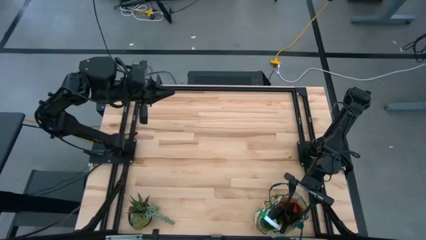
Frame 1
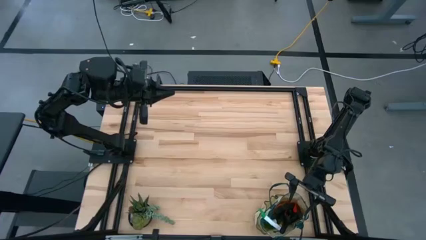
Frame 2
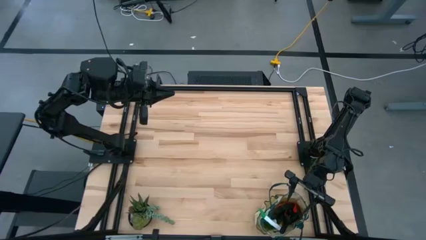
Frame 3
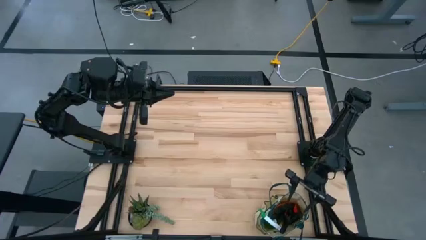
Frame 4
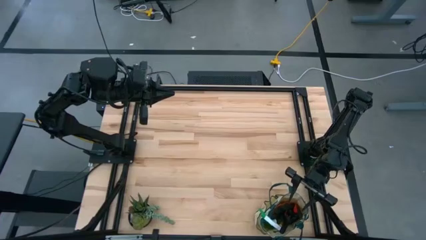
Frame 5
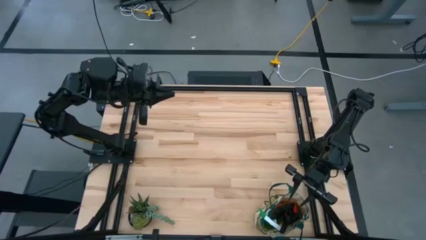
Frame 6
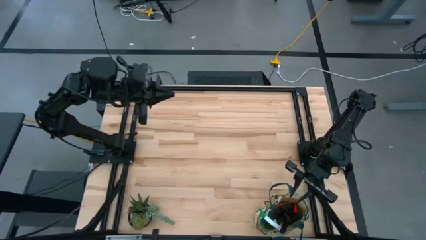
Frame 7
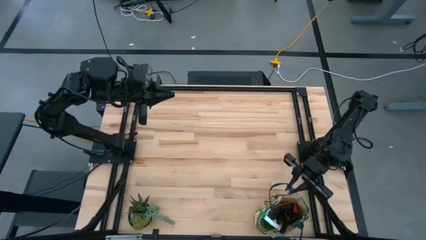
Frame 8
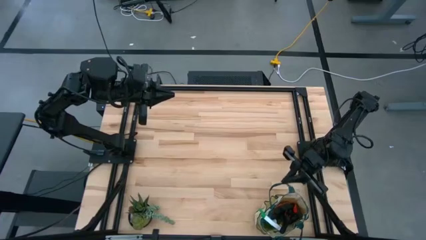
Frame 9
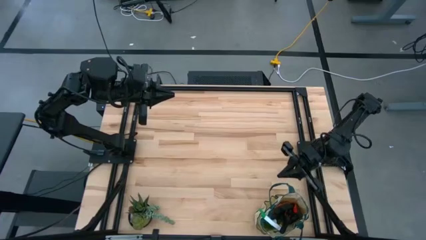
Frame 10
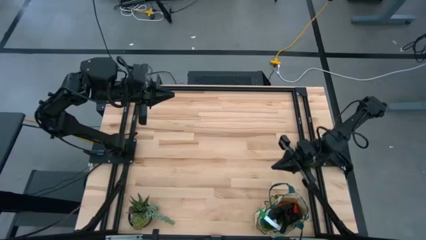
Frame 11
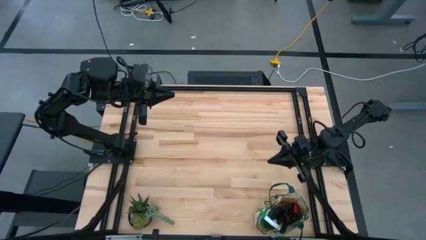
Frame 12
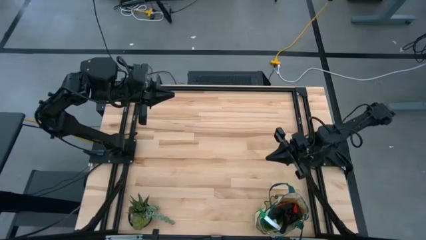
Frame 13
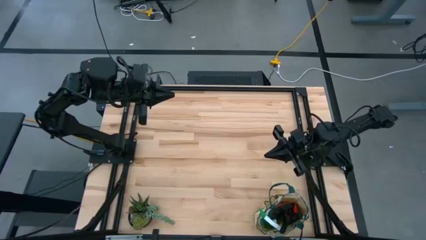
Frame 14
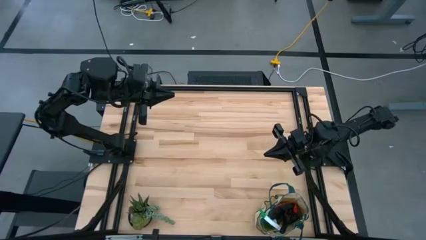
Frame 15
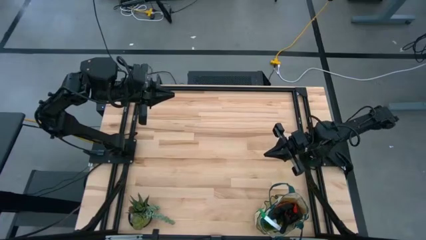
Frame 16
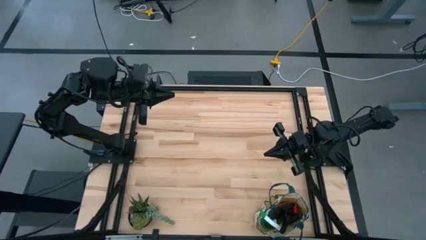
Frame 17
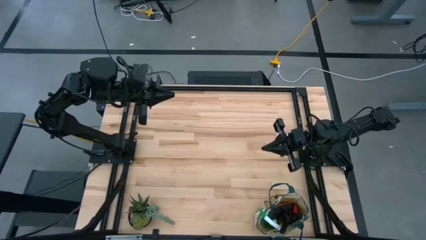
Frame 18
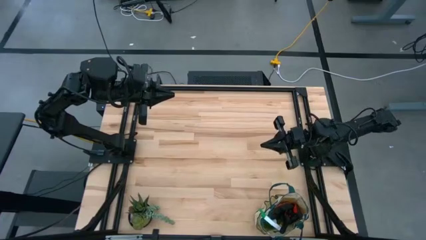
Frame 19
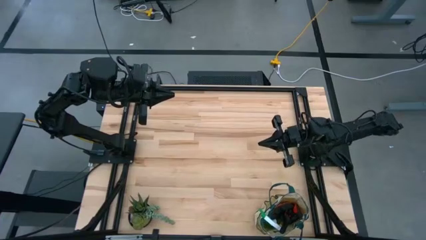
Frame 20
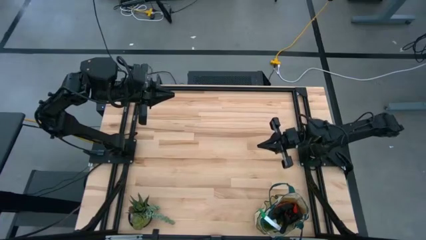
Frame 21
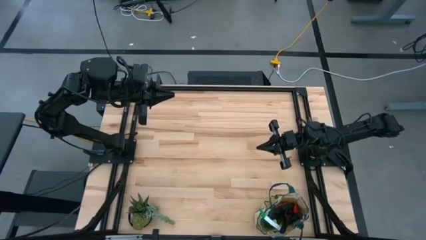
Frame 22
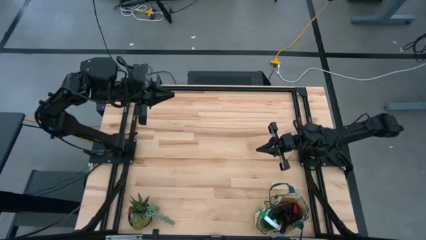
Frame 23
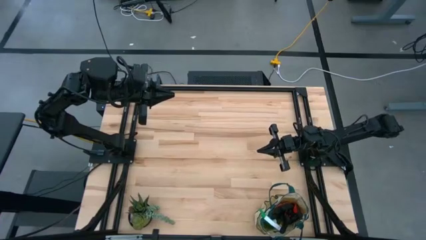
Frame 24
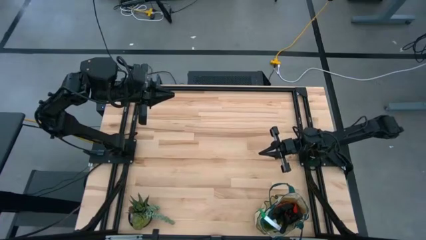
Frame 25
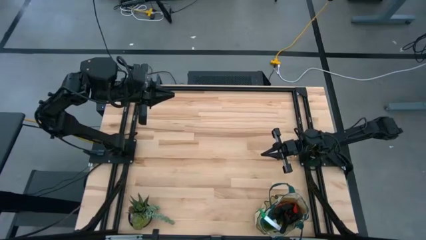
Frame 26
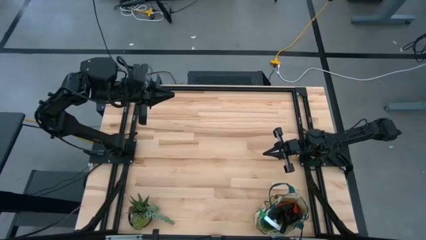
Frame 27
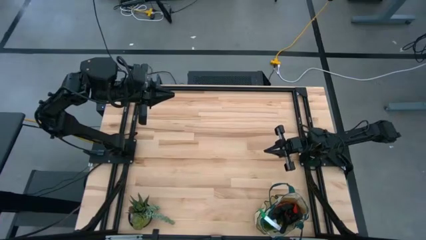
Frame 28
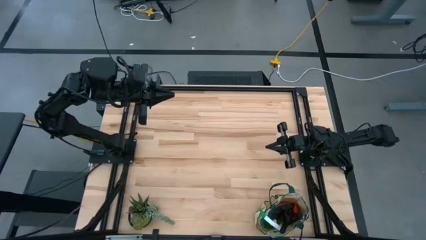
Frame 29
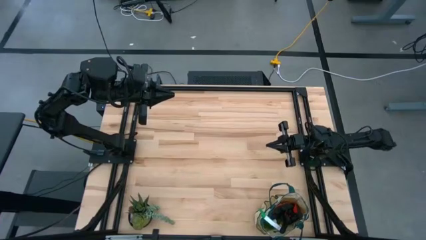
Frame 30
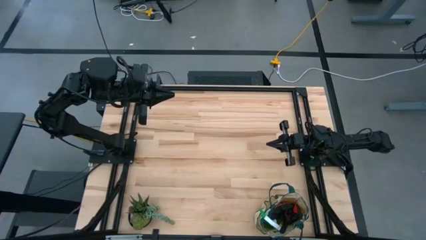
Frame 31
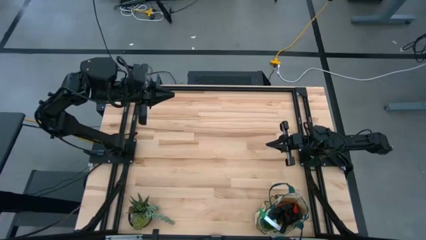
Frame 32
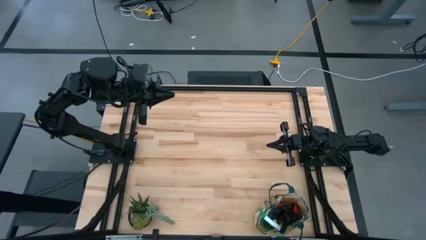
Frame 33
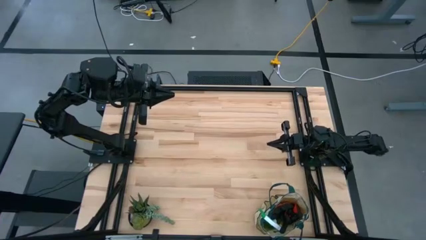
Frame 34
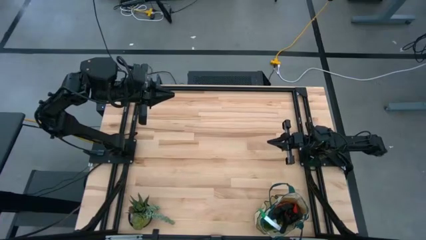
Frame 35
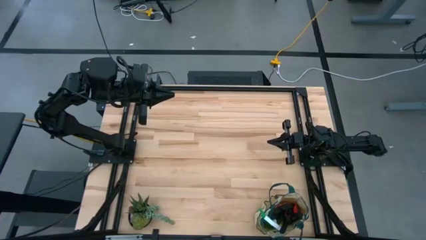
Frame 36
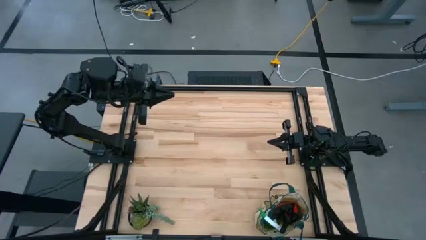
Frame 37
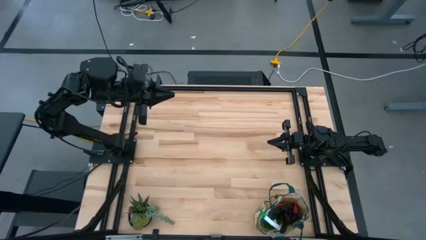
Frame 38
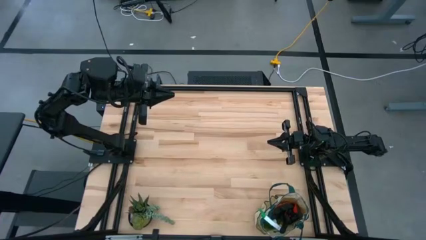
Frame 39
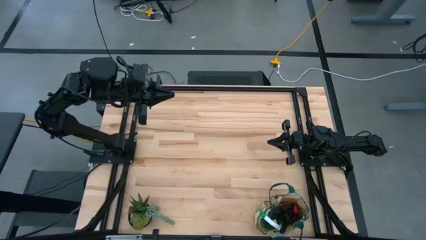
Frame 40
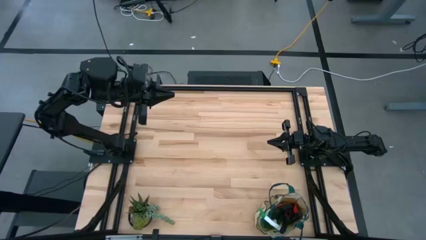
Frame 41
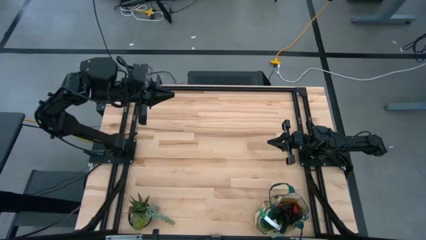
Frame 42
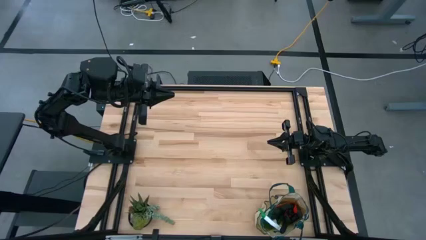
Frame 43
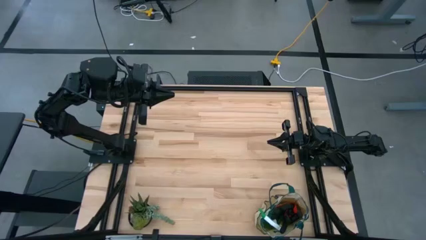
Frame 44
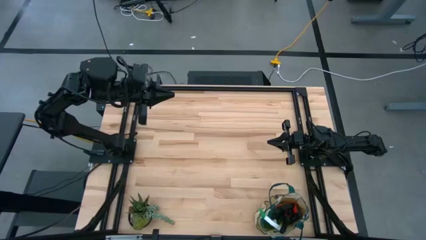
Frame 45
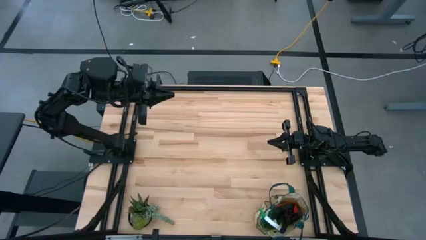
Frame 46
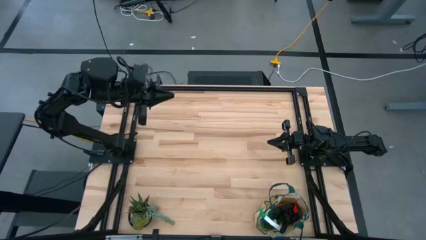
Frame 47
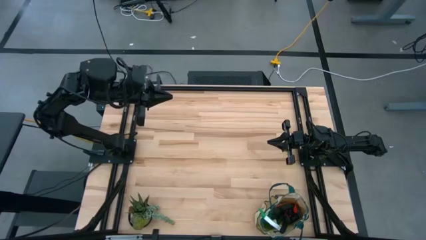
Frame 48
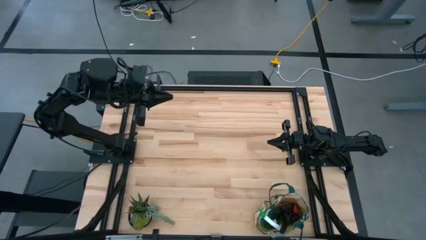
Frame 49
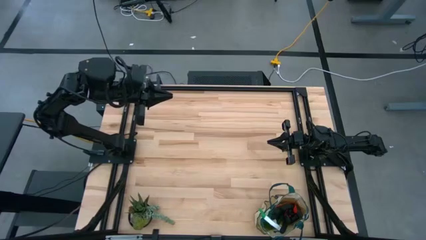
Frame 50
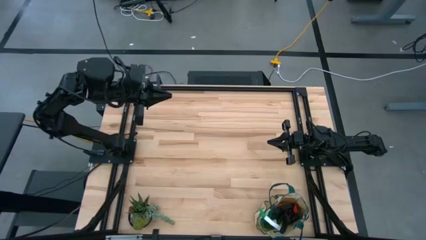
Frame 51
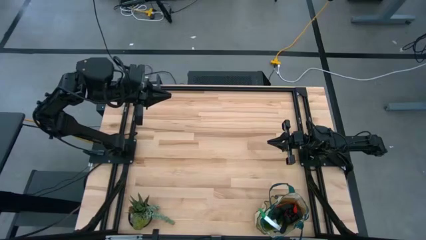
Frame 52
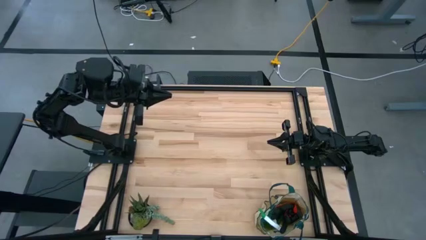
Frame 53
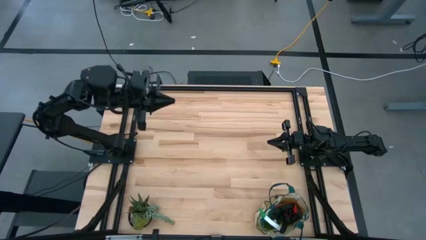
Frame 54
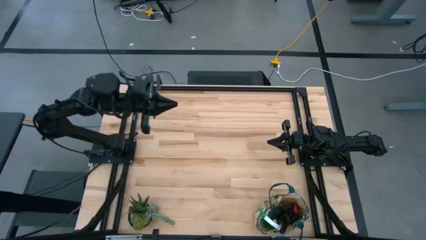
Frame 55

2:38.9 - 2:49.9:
Task: Pick & Place Garden tools in Gardening bag
Return to Home Position

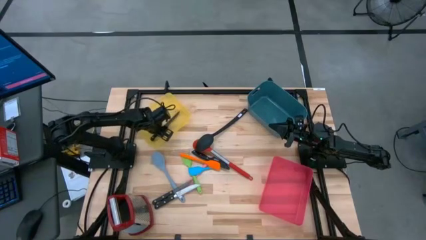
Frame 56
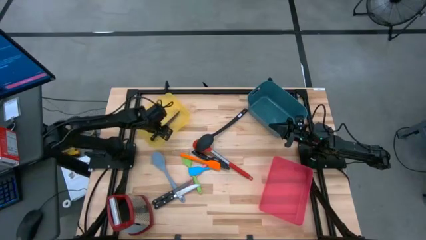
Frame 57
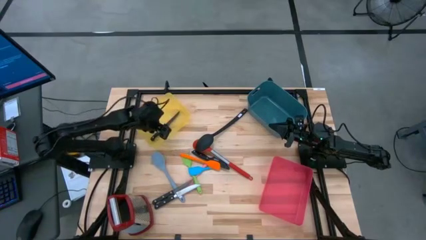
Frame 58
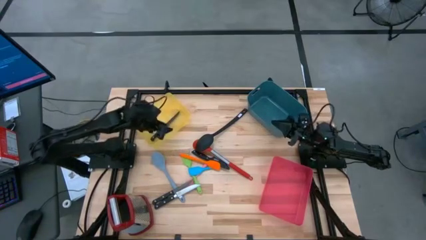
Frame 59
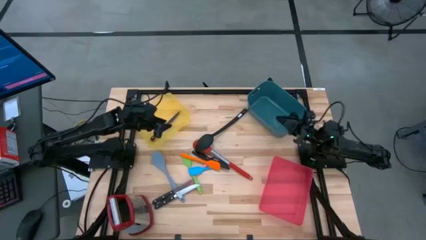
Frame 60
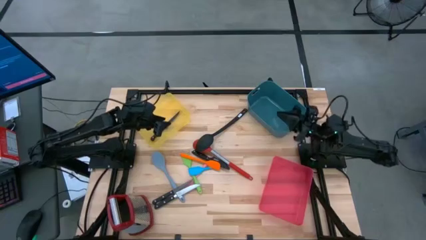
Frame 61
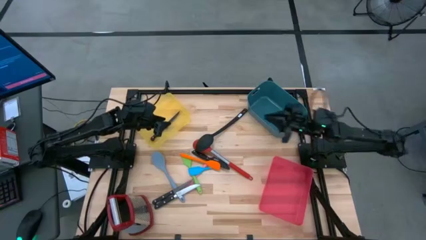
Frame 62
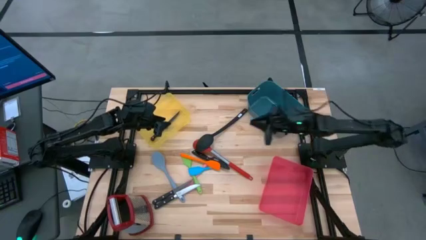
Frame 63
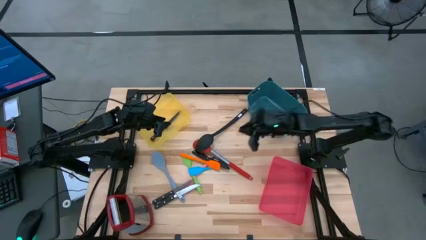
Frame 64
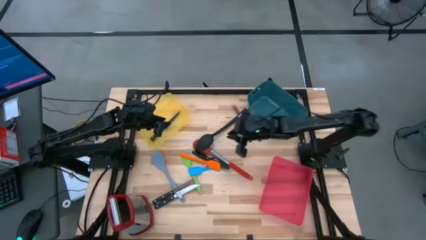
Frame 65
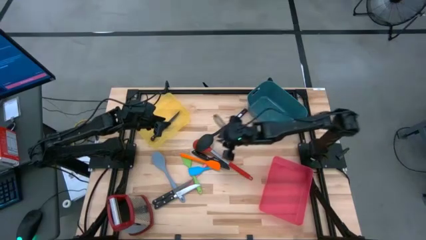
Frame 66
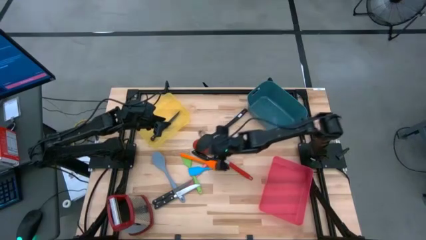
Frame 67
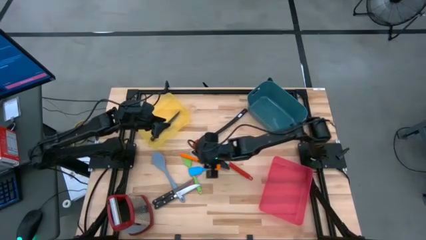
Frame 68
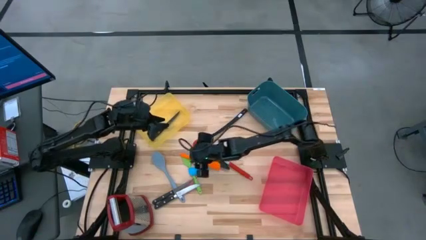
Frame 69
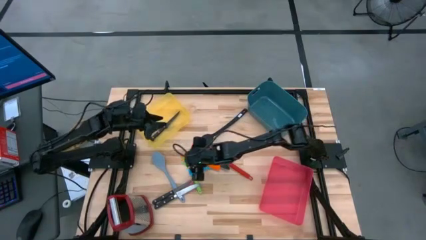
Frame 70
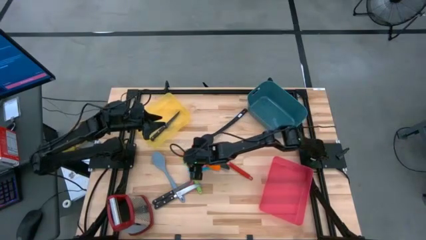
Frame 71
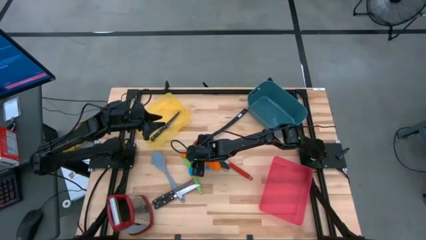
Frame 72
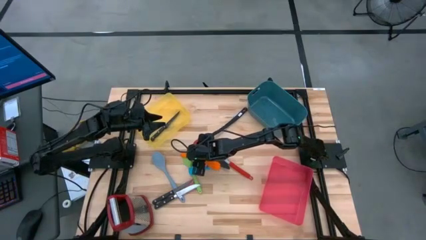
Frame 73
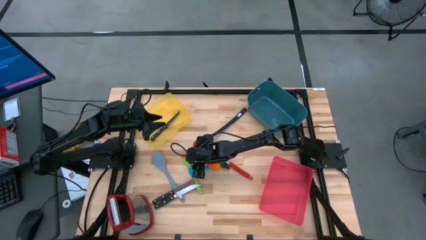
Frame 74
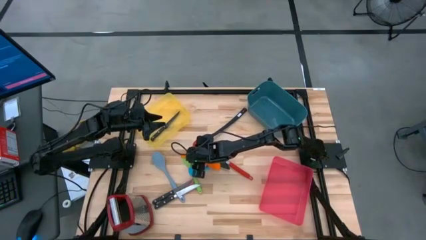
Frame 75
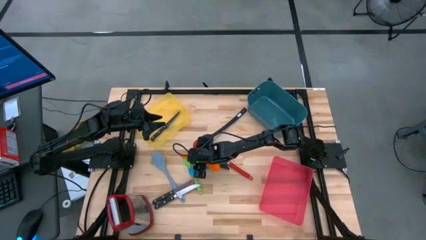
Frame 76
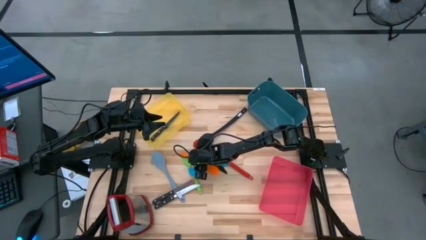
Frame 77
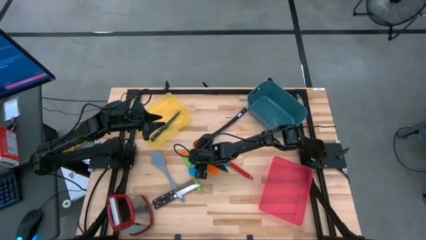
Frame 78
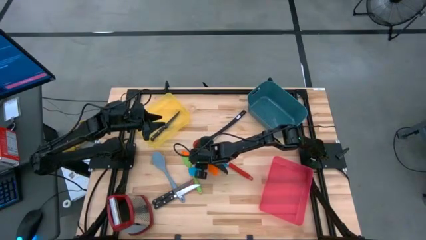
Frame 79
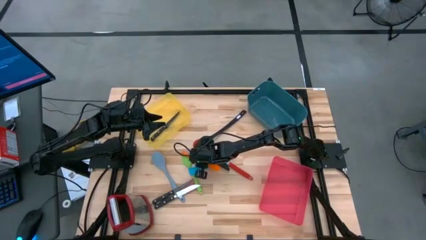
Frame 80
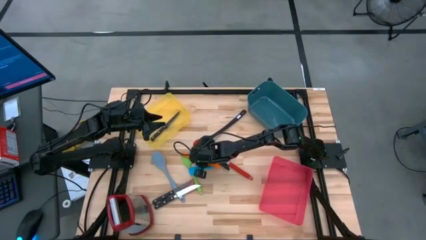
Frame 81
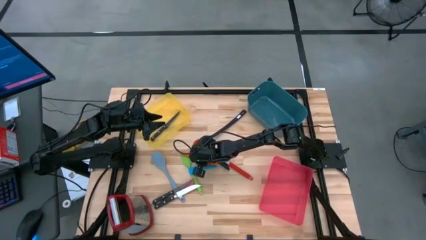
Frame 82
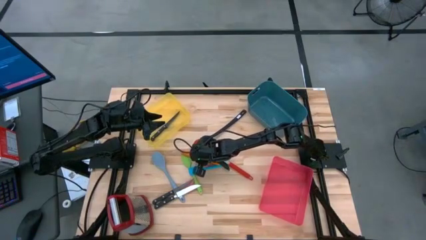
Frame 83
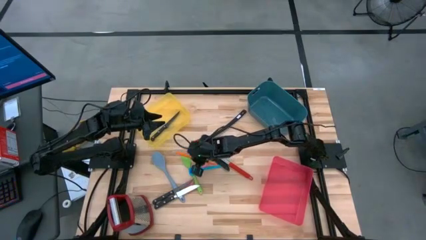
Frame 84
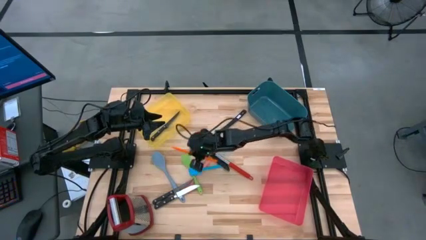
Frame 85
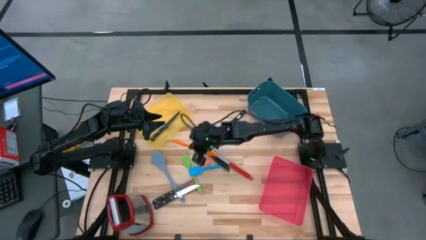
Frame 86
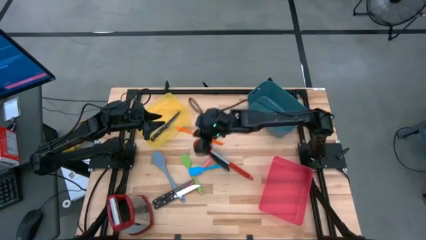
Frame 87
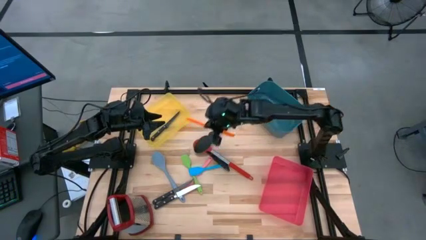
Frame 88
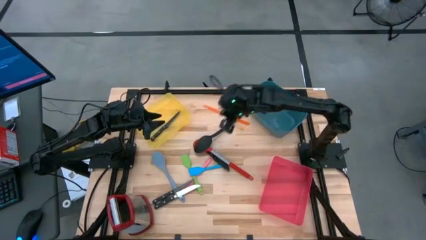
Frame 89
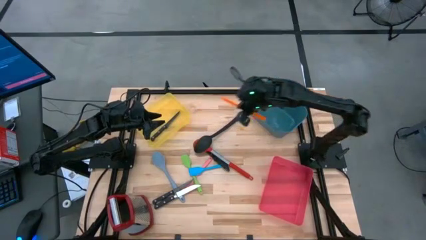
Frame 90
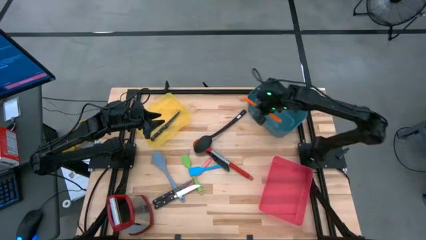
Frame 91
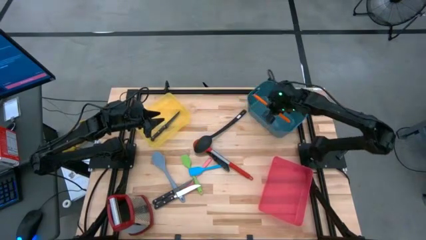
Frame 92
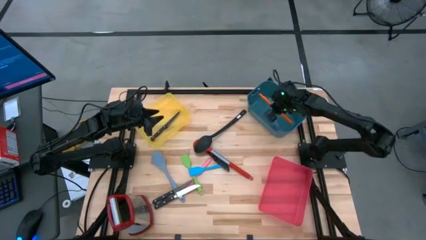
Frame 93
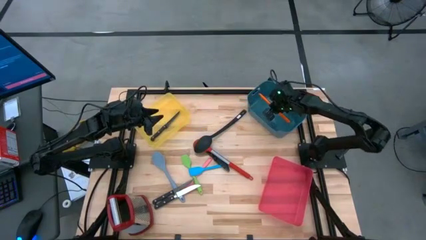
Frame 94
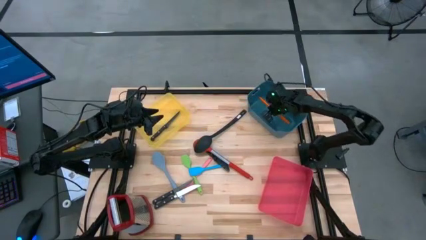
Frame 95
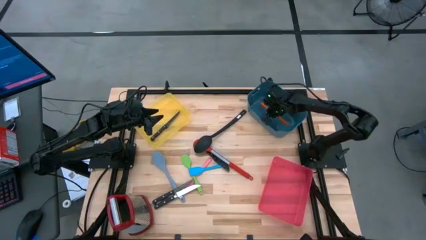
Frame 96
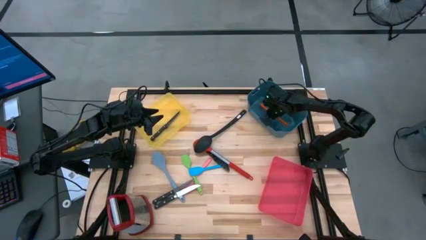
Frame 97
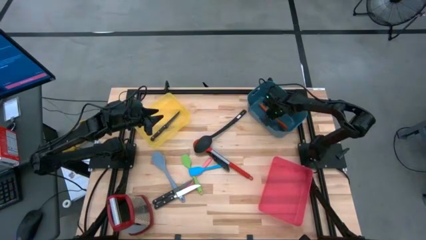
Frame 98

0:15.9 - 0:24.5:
Task: Pick & Place Kitchen Items
Put the orange spatula into the green bin
